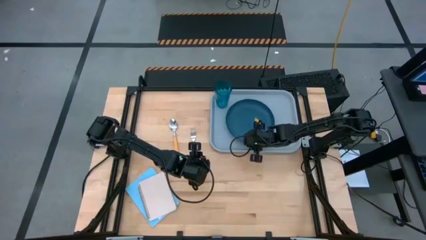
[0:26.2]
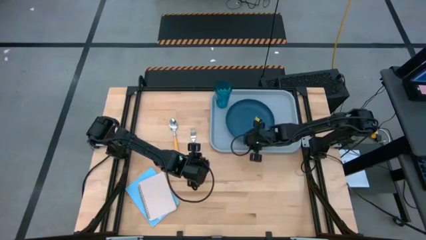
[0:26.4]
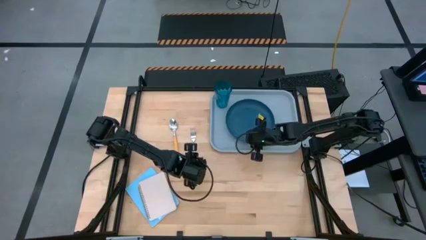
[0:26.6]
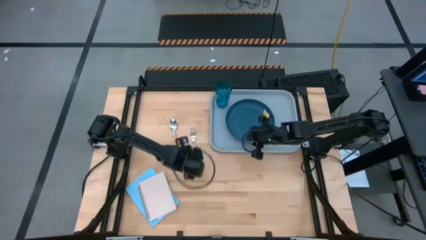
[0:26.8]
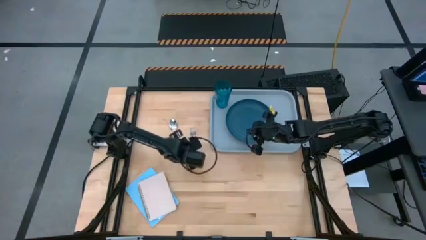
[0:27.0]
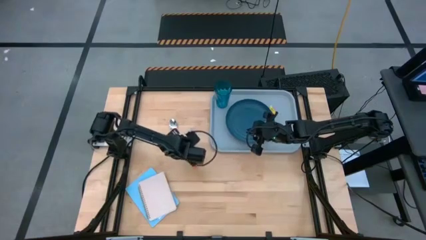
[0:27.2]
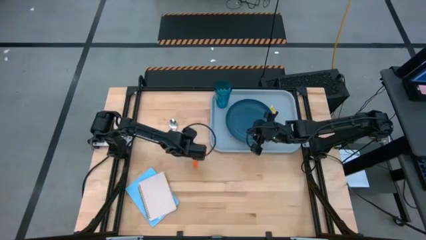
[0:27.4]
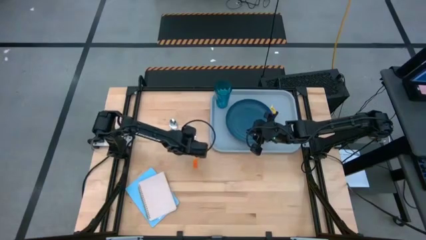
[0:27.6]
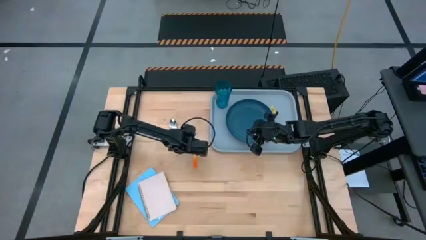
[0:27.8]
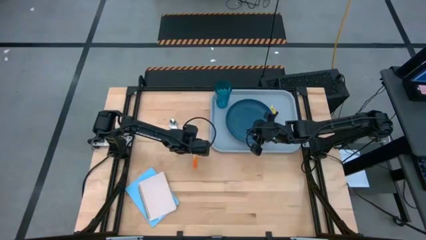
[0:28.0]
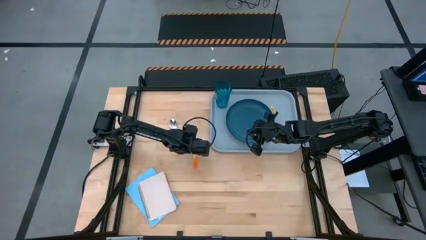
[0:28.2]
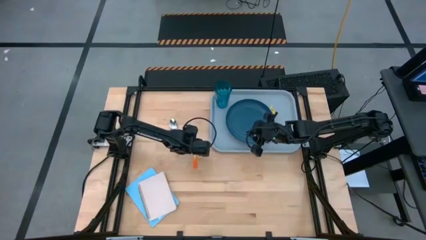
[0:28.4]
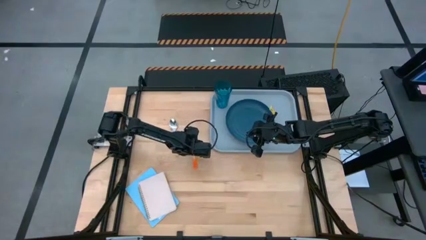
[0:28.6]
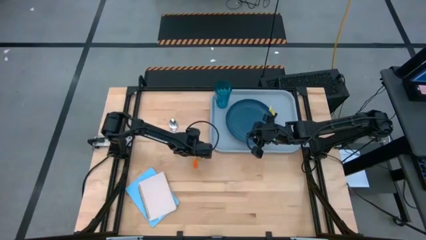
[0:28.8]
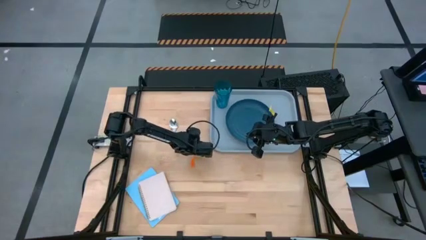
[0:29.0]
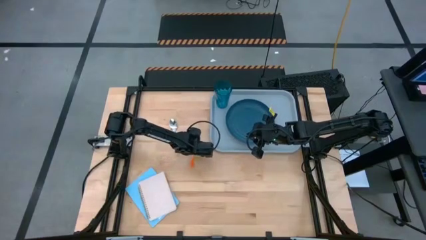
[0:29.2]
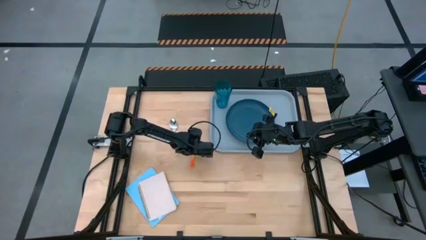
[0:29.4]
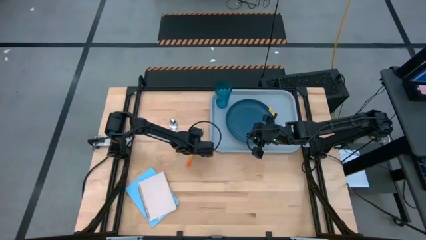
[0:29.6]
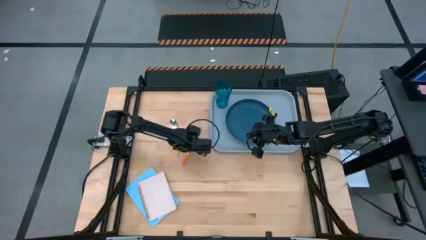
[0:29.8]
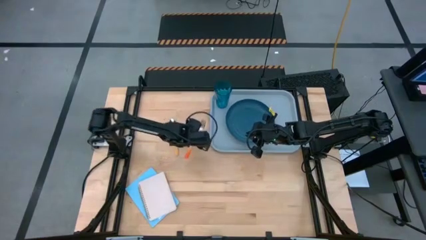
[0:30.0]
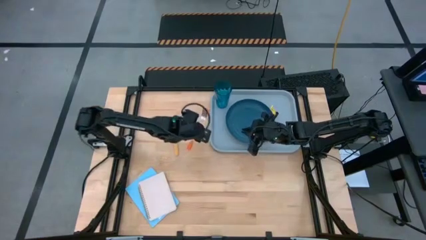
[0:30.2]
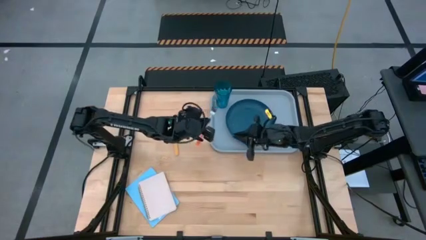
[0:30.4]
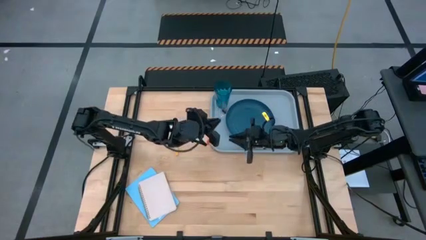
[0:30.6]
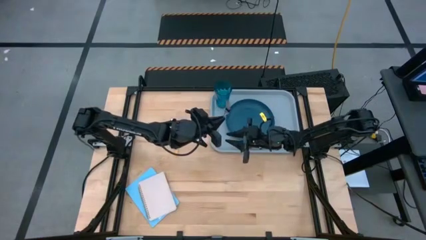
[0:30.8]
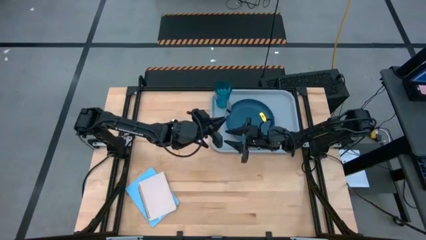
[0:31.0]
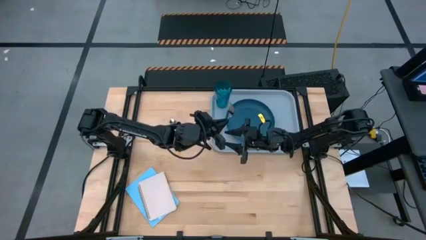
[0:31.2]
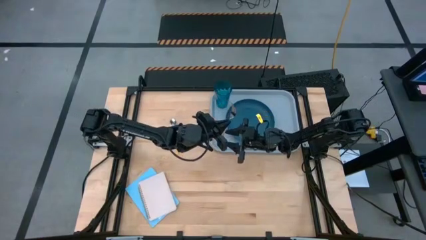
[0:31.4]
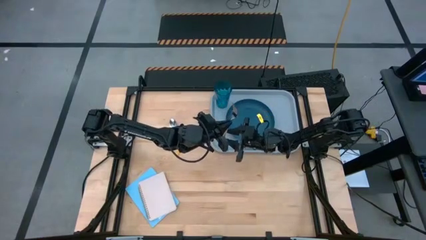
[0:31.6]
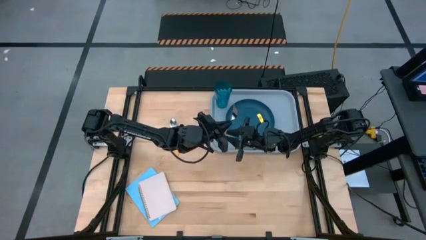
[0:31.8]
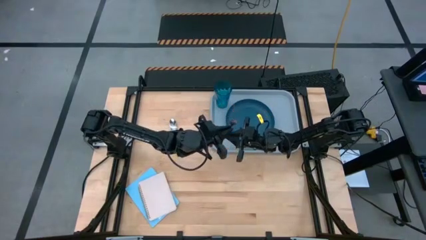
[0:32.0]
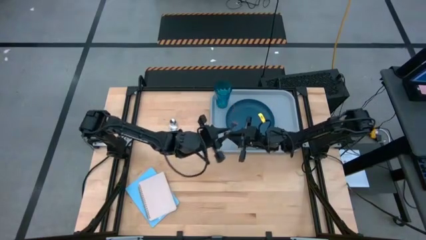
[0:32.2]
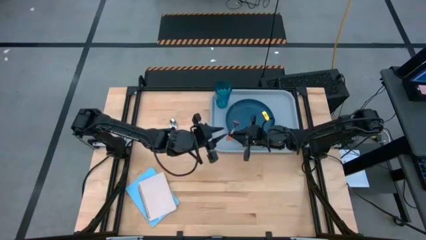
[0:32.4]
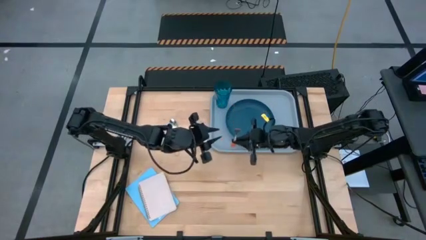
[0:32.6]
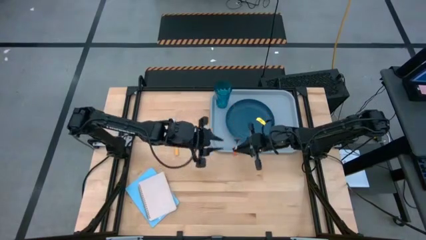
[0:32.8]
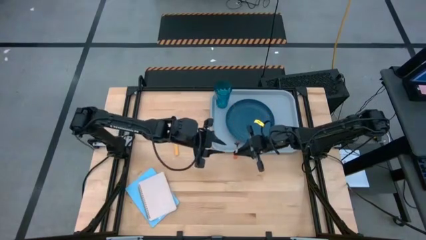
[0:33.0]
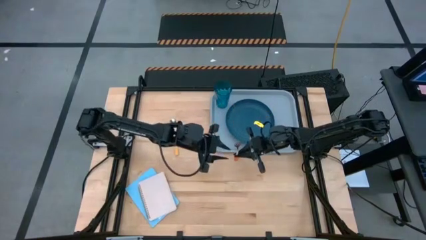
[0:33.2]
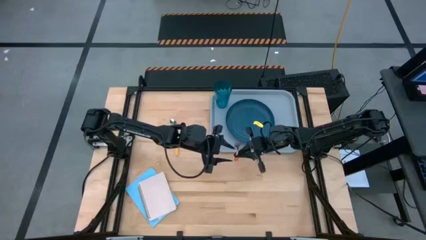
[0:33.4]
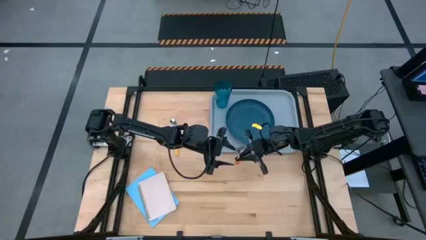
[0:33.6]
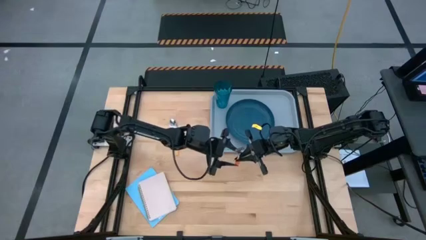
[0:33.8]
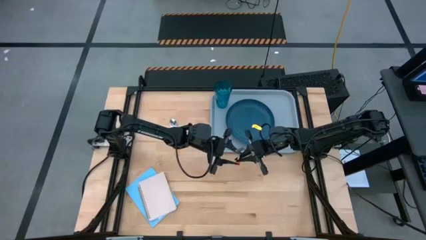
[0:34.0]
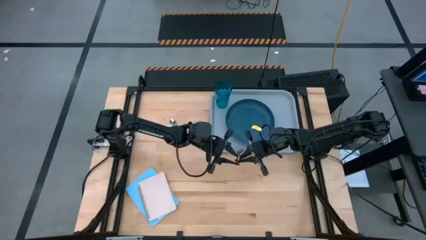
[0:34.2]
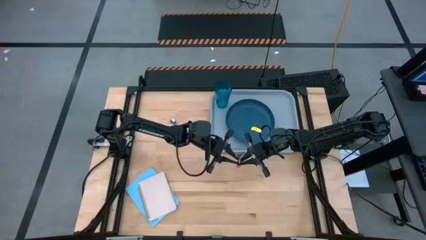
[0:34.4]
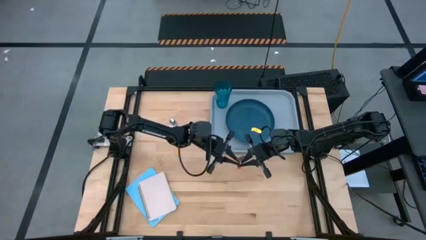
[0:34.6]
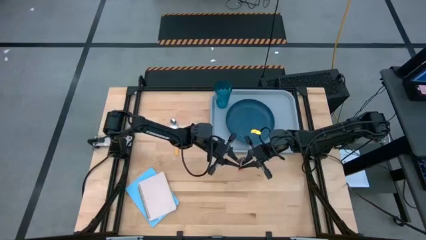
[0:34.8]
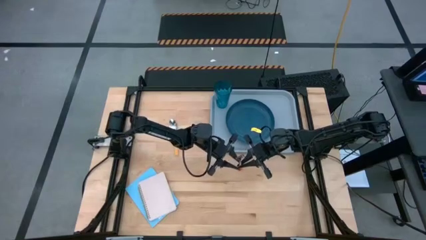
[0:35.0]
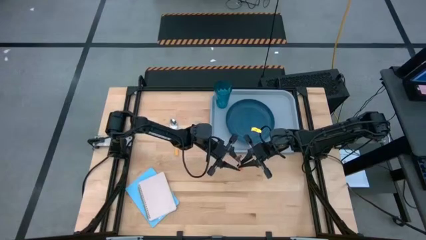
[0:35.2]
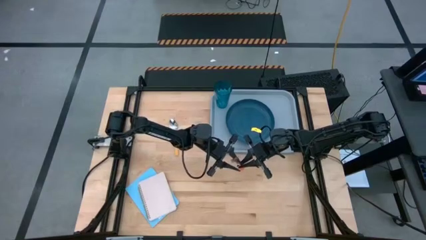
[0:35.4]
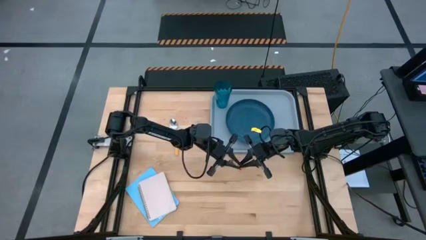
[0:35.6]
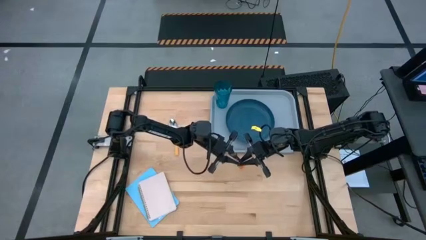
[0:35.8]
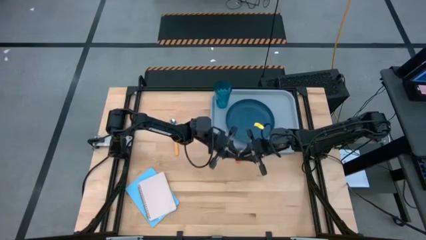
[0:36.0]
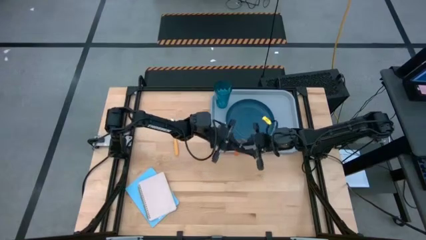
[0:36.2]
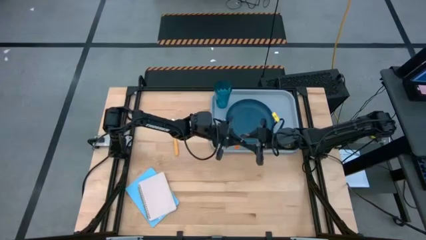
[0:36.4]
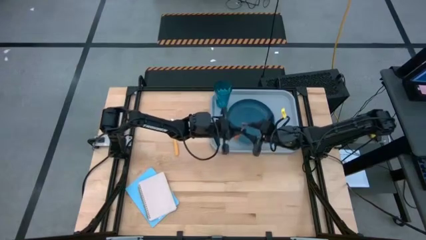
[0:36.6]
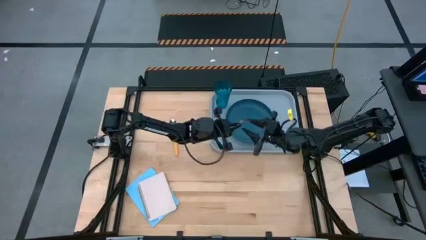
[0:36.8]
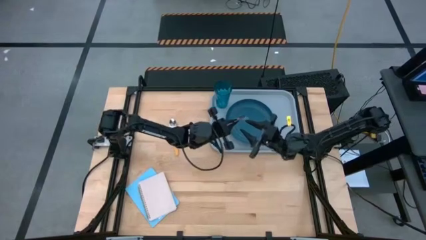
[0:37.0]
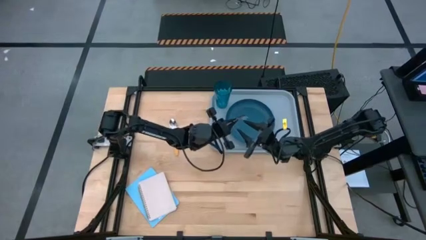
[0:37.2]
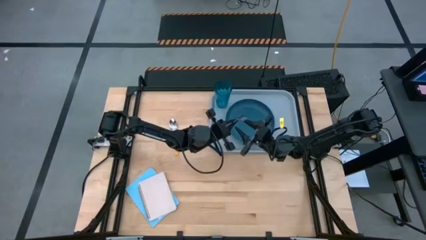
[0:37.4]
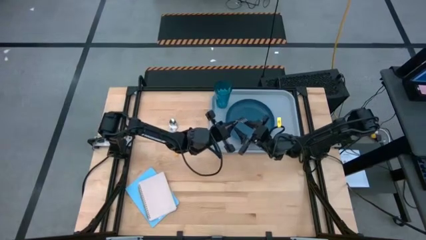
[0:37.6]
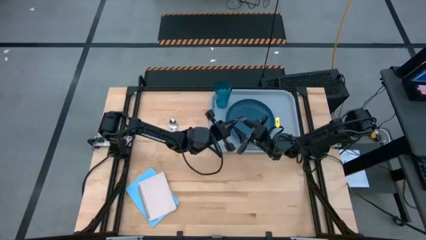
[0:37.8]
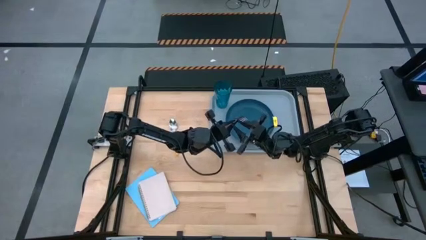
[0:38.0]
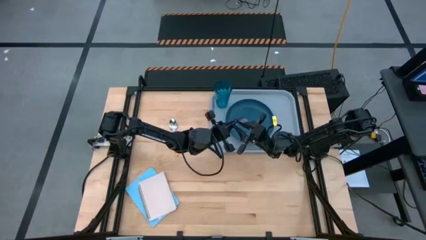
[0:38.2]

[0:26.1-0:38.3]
Task: Pick and place plate/cup/fork/spoon on tray
Put the orange fork on the gray tray to the right of the blue plate

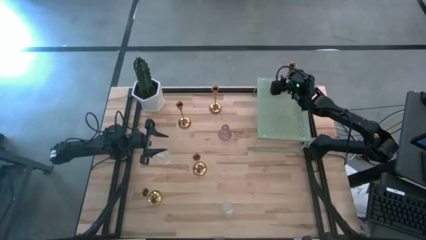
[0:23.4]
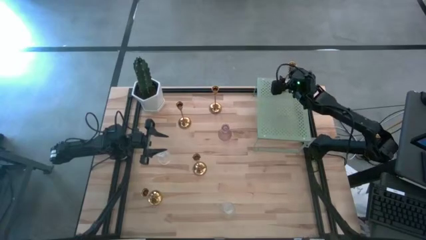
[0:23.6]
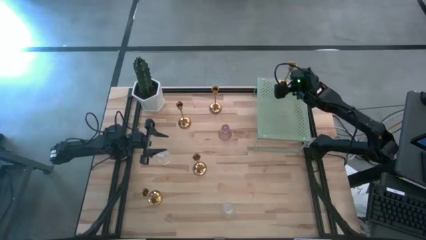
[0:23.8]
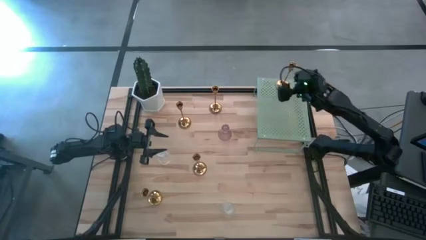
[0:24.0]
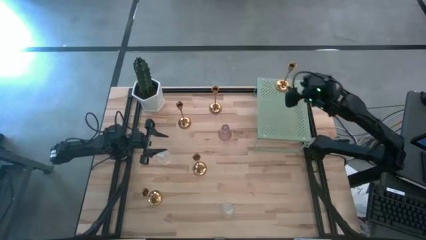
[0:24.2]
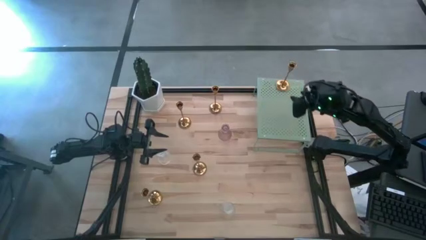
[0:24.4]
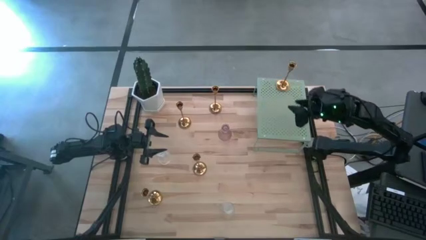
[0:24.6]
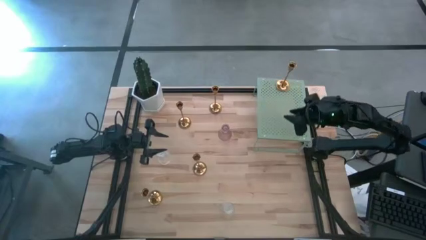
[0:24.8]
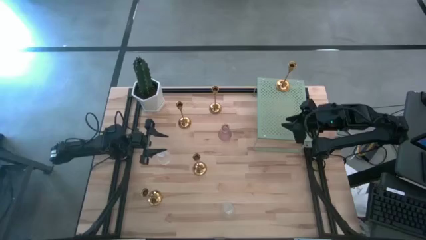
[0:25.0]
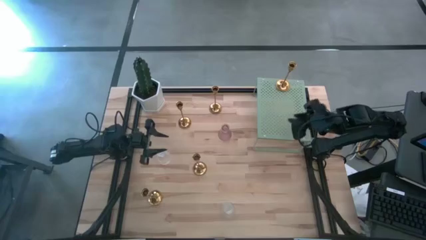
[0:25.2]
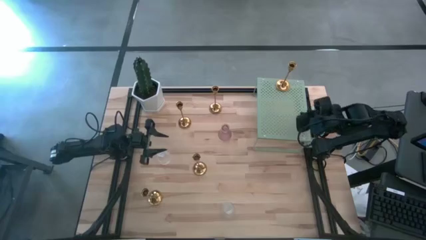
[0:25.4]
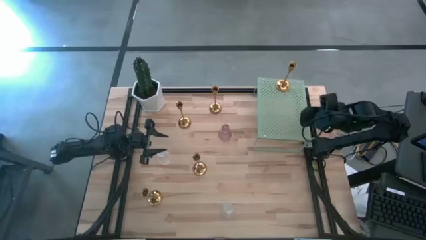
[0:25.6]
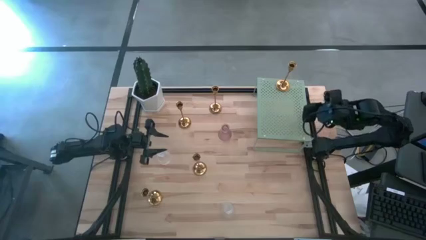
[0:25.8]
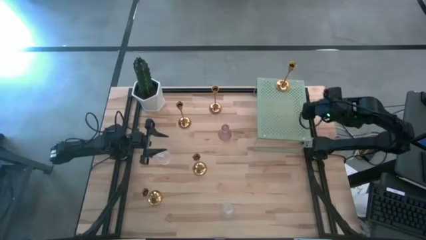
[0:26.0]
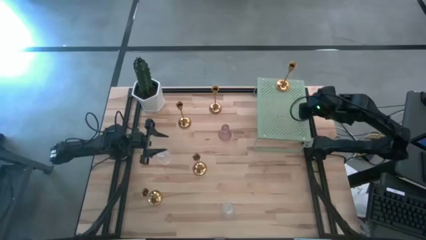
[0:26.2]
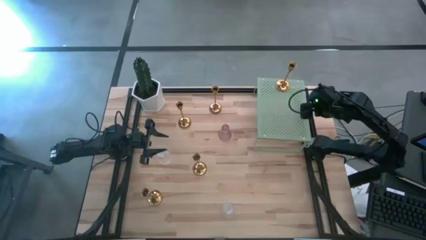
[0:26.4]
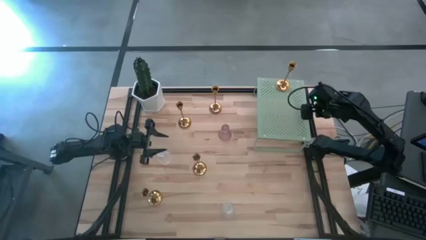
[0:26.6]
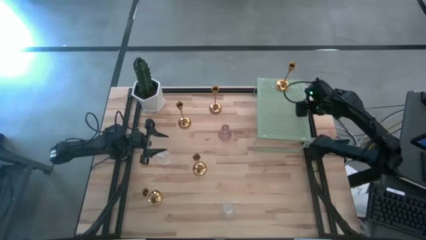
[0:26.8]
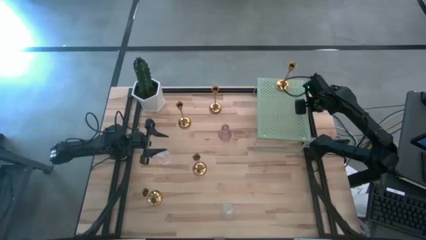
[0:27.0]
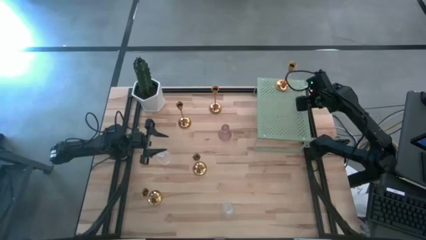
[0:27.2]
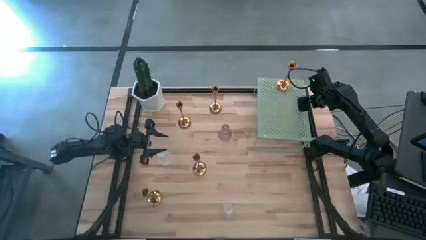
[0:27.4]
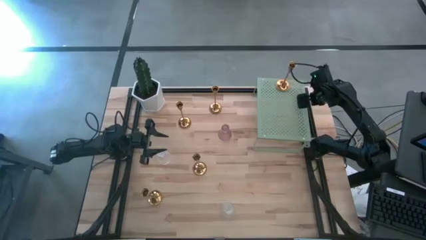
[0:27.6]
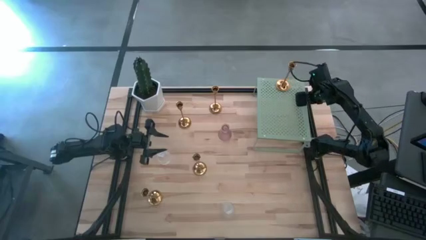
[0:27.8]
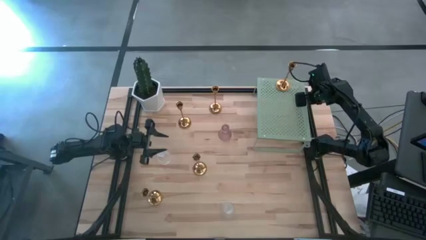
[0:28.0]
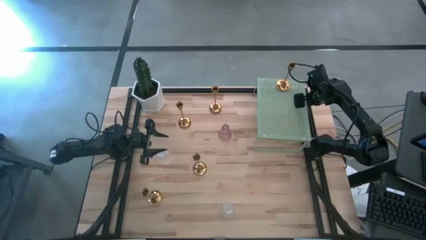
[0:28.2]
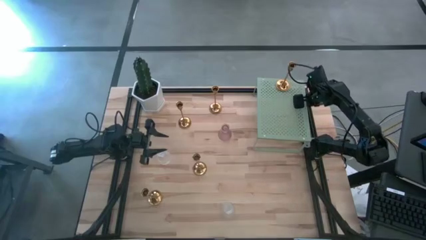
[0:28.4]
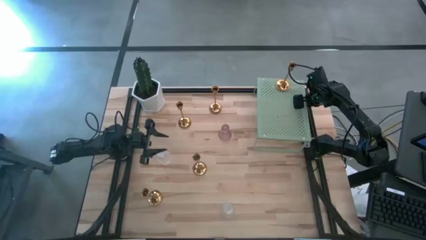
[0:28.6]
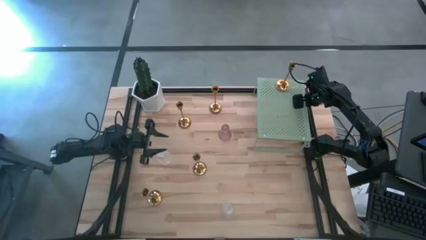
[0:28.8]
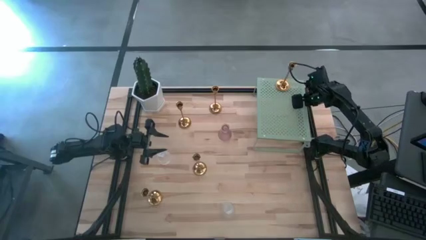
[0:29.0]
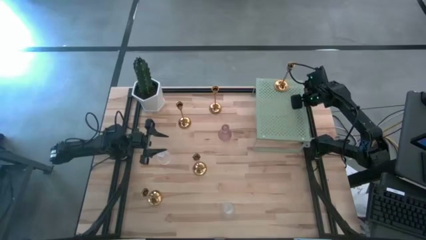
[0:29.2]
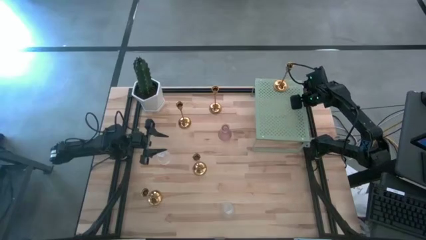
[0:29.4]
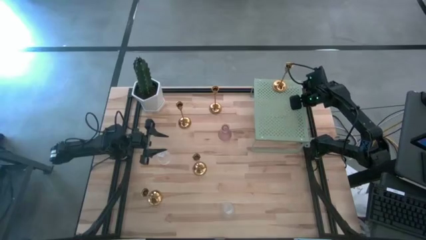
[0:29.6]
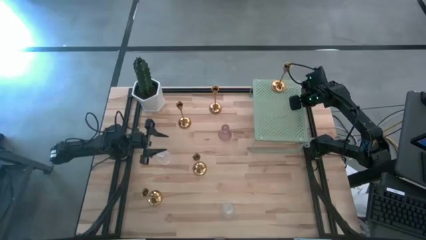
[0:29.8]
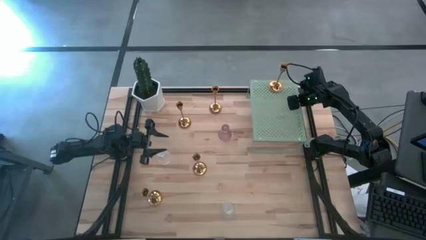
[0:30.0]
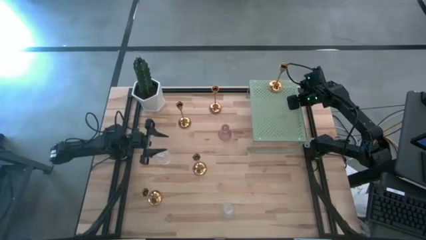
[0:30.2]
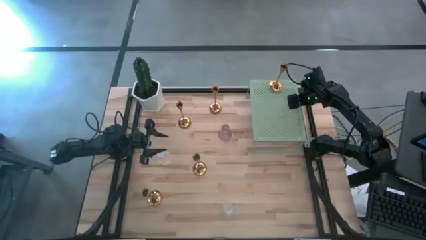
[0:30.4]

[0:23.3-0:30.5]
Task: Pick & Place candle stick holders
Adjust the shelf
